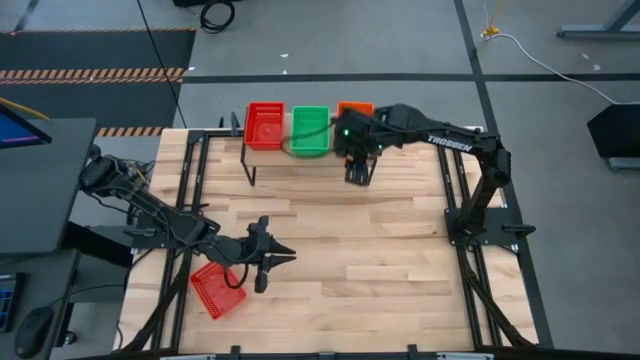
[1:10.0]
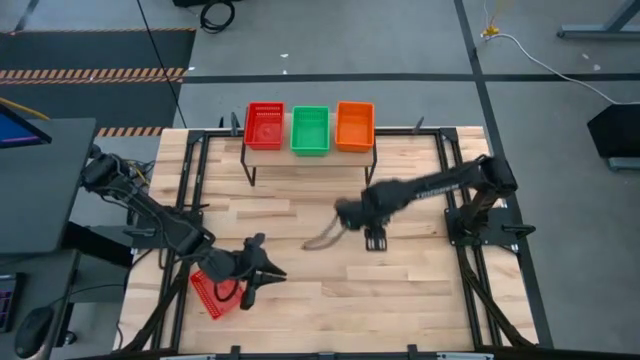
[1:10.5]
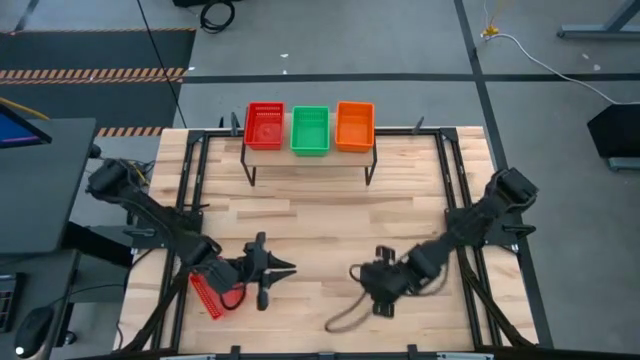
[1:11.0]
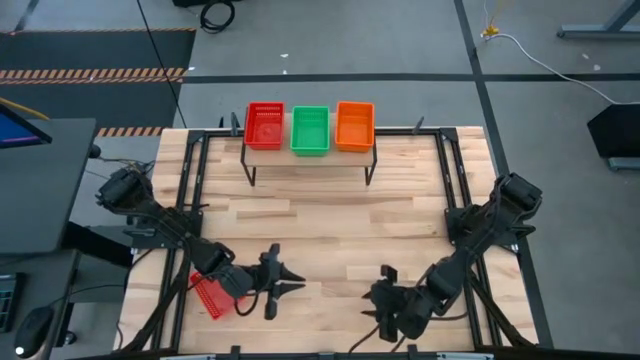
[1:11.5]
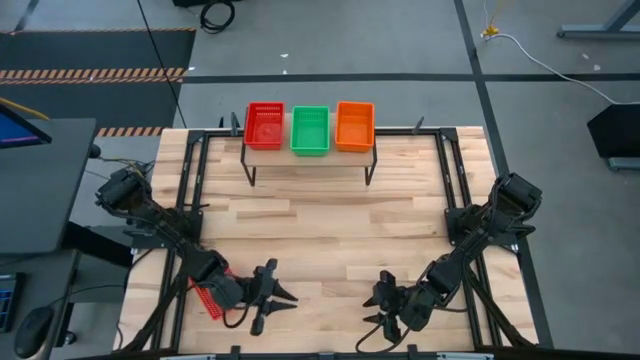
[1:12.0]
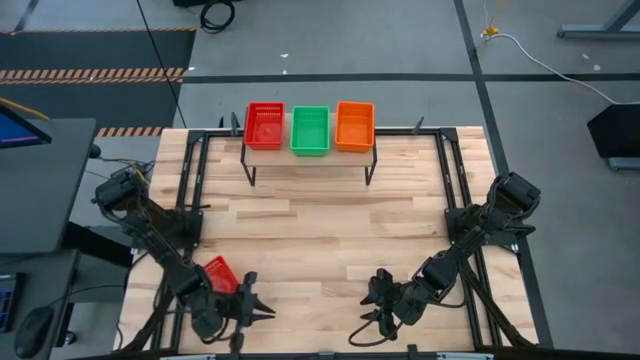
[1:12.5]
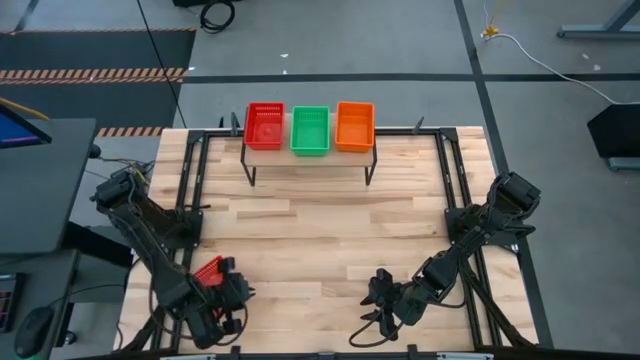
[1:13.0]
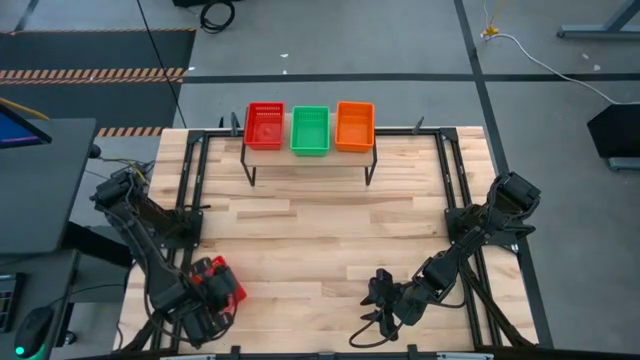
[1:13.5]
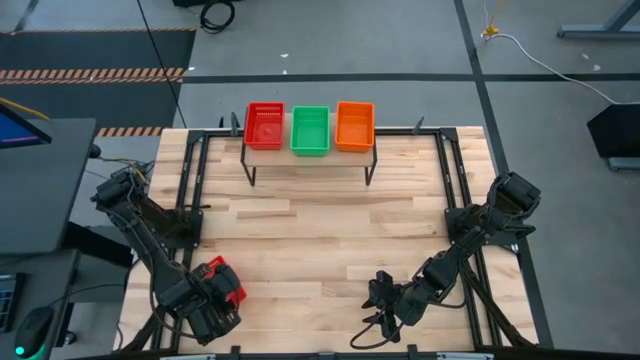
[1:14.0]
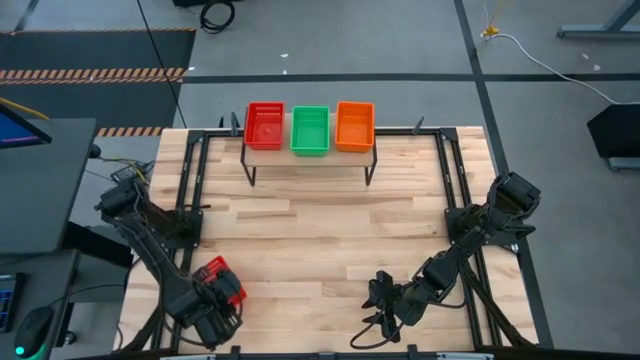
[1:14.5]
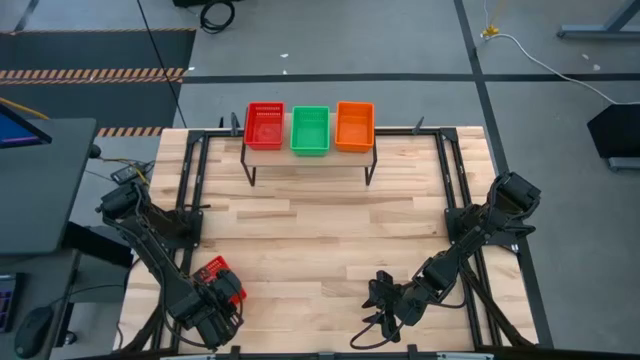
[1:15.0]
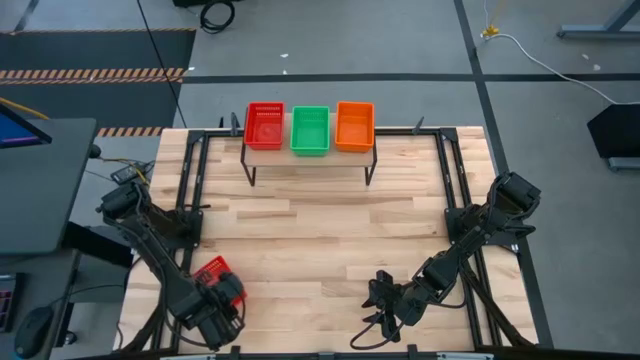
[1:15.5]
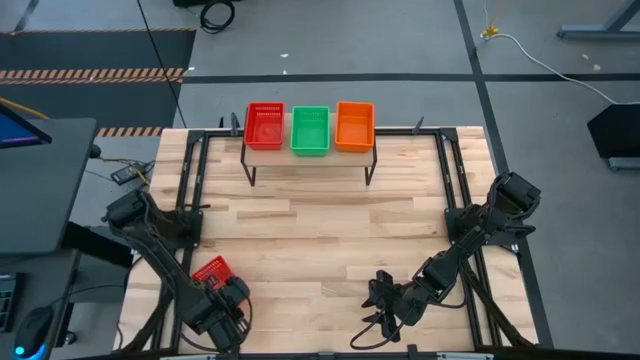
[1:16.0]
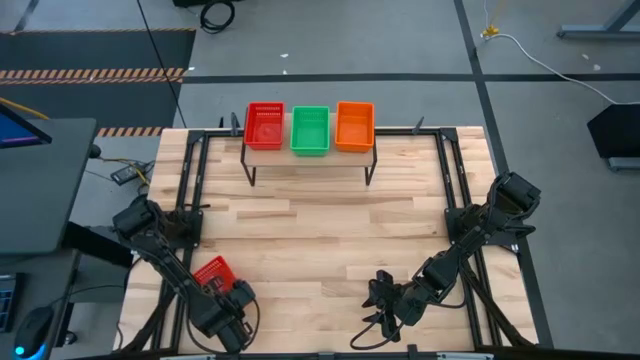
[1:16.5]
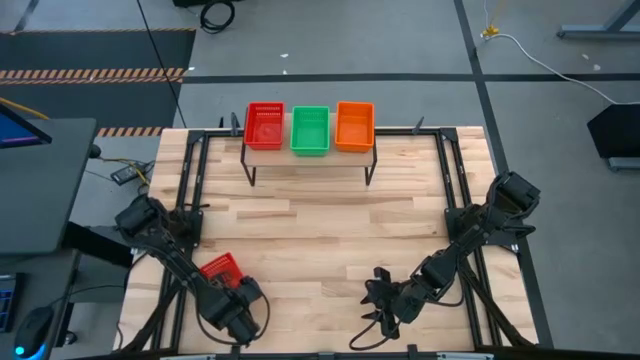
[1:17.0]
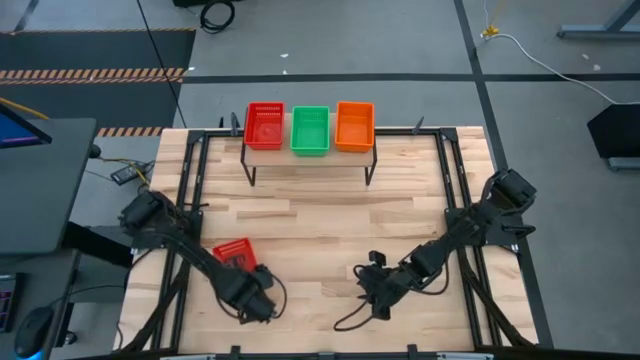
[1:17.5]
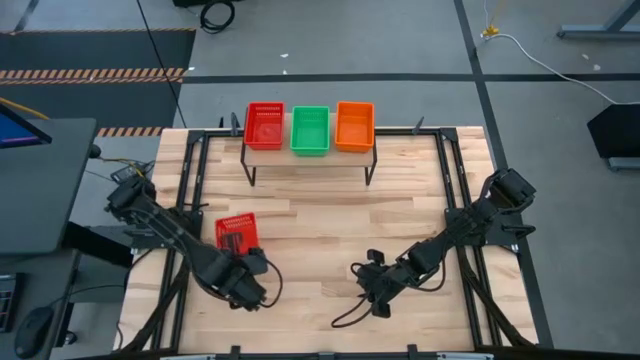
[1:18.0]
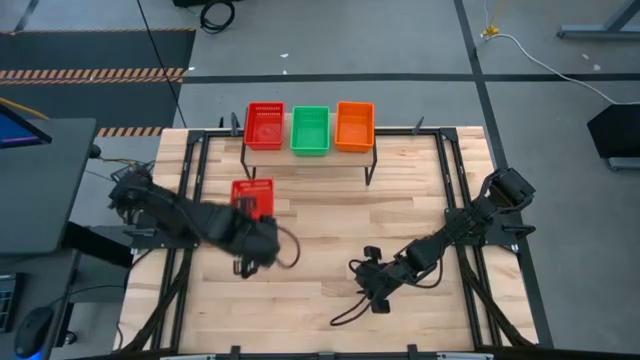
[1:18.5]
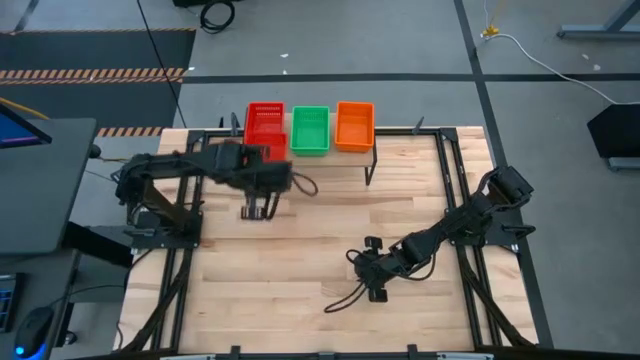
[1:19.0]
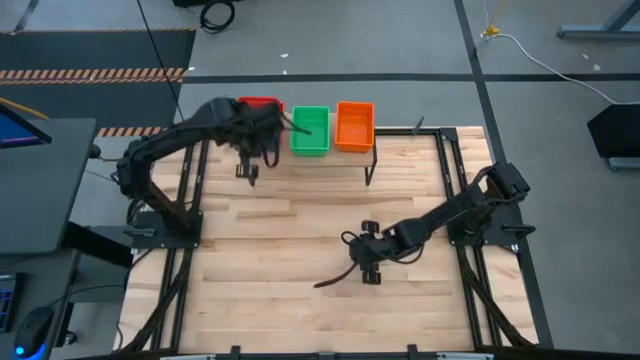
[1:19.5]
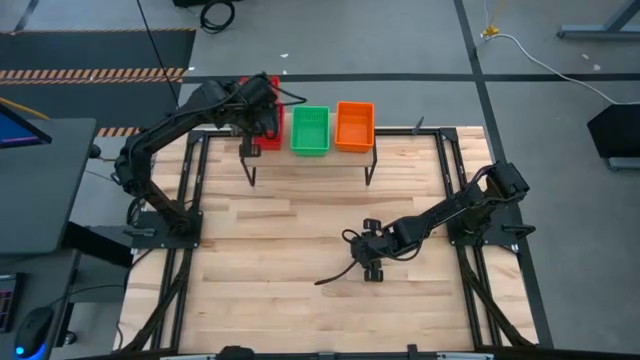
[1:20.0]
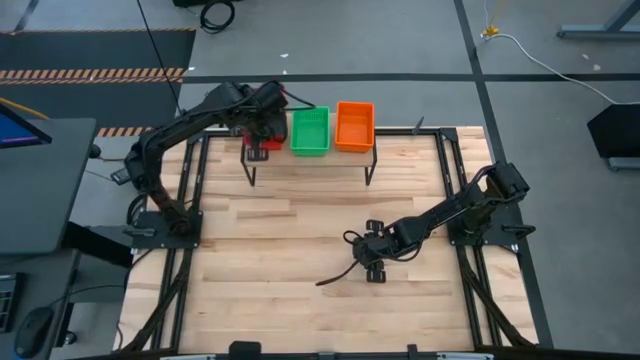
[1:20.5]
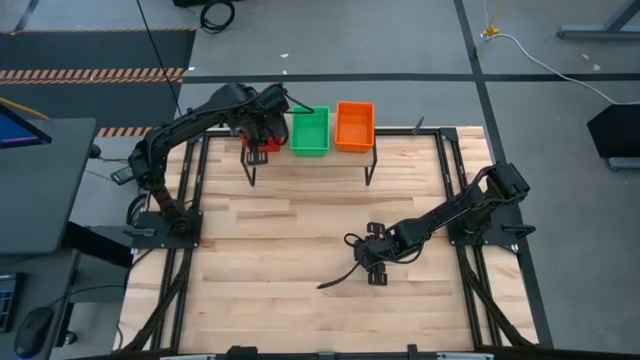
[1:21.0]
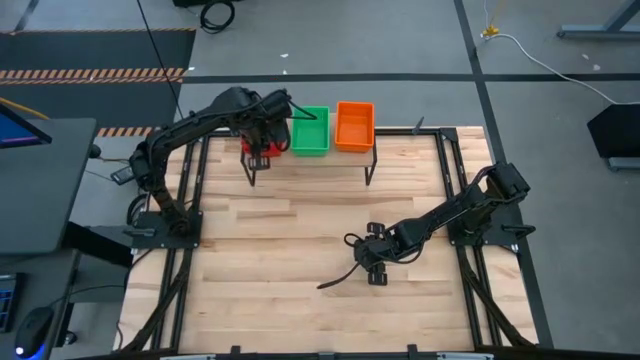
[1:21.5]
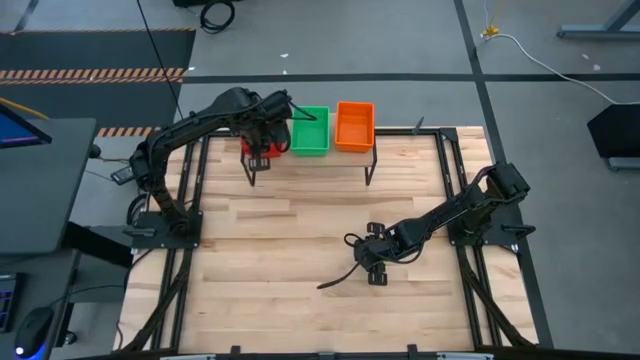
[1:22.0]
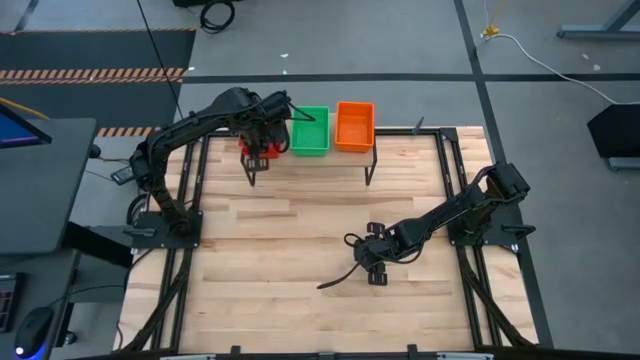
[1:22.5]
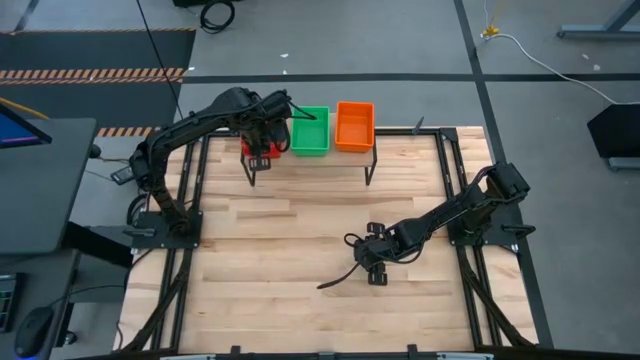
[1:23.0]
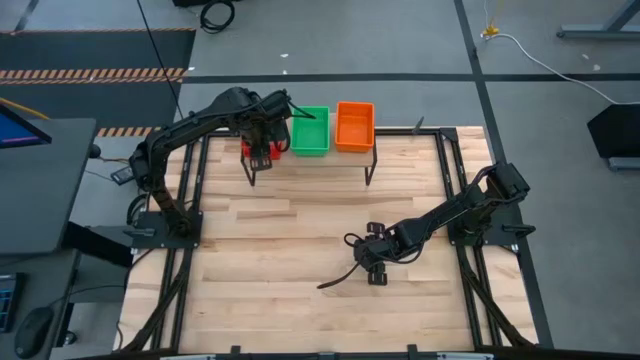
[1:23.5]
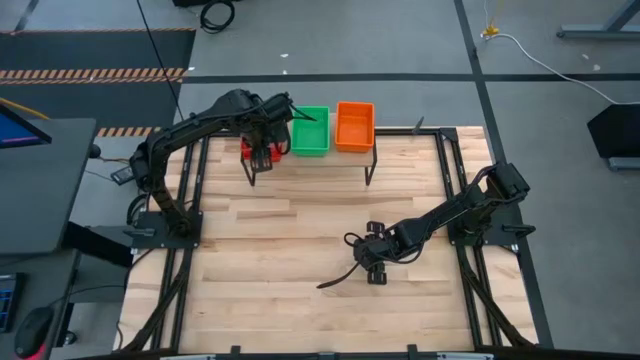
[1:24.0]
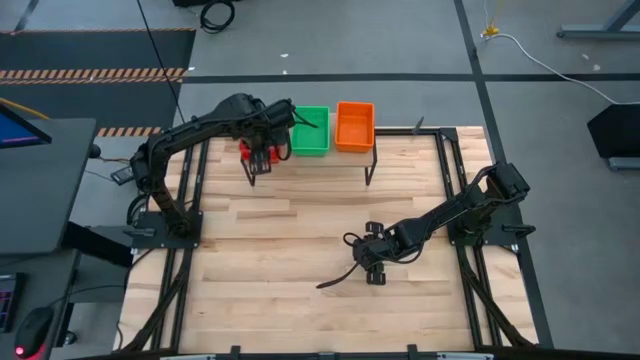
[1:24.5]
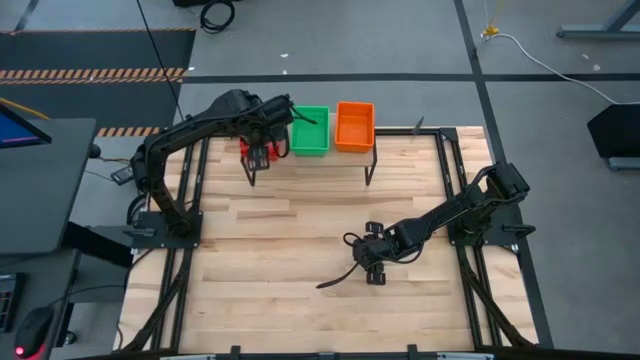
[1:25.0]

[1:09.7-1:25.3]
Task: Stack baskets on shelf by color
Stack the red basket on top of the red basket on the shelf
